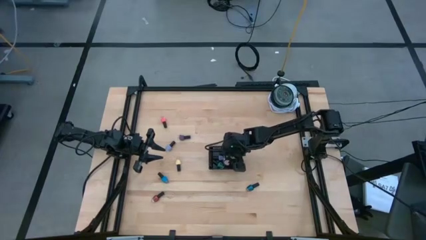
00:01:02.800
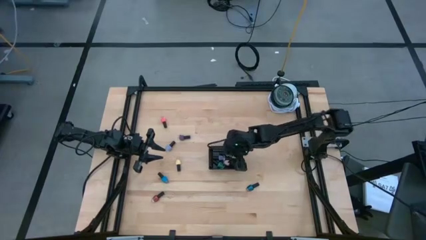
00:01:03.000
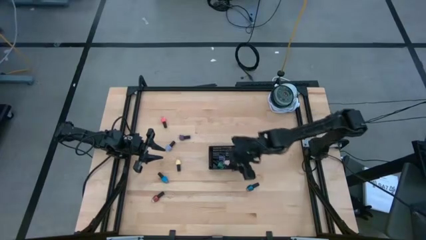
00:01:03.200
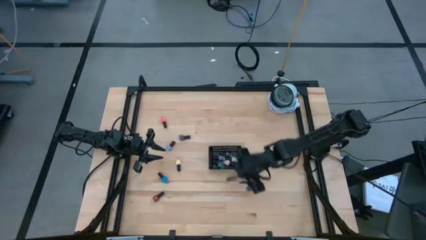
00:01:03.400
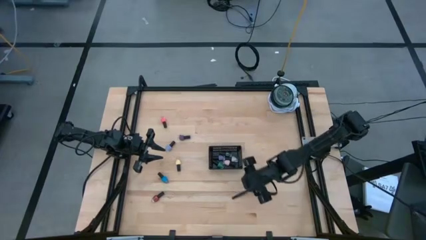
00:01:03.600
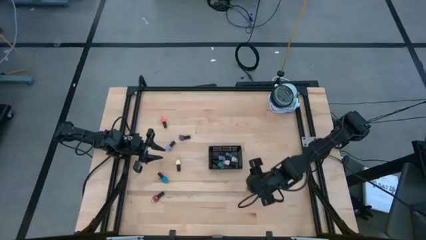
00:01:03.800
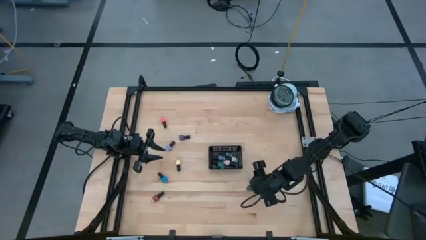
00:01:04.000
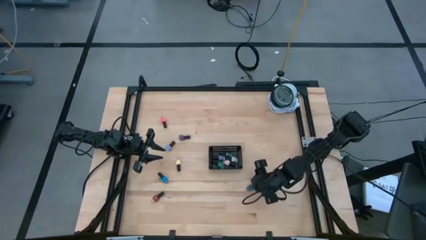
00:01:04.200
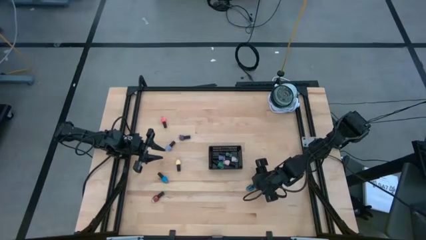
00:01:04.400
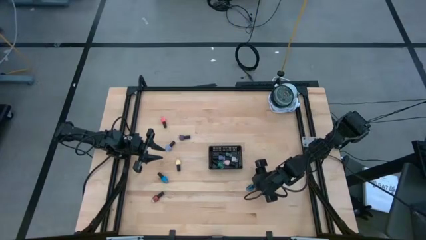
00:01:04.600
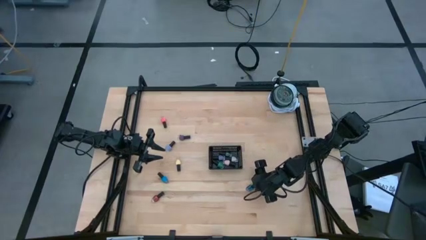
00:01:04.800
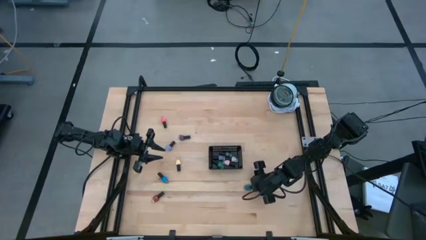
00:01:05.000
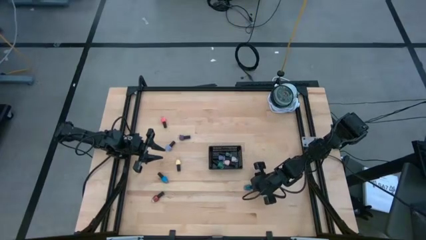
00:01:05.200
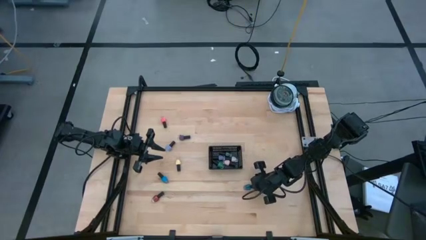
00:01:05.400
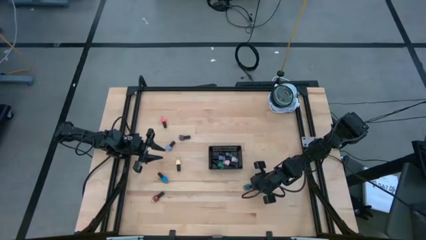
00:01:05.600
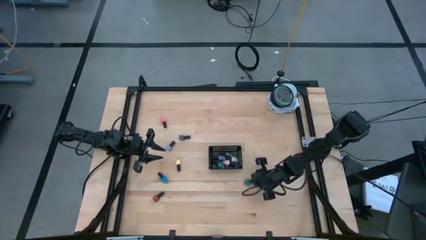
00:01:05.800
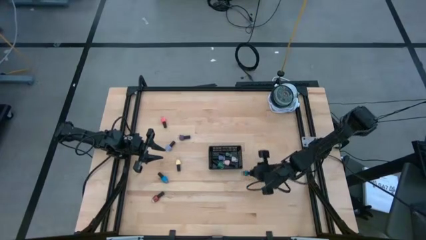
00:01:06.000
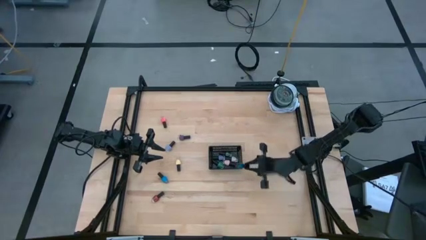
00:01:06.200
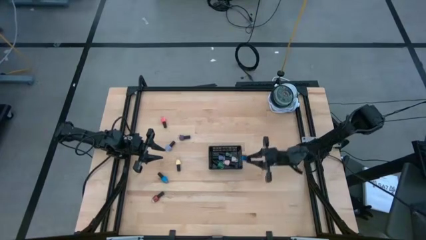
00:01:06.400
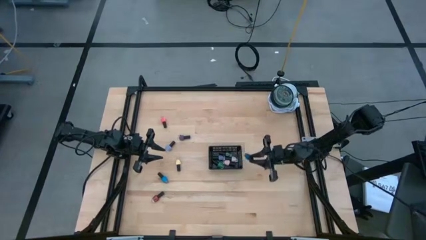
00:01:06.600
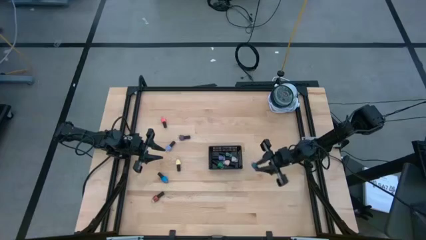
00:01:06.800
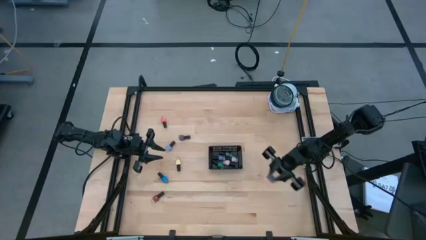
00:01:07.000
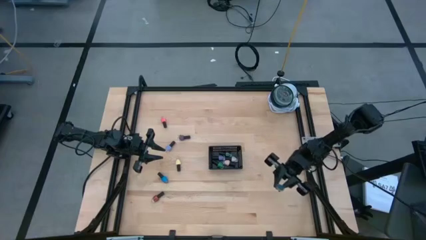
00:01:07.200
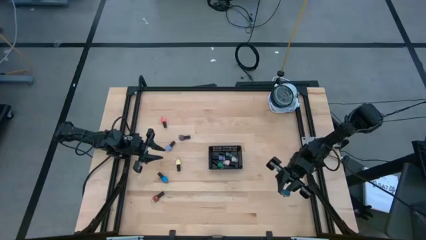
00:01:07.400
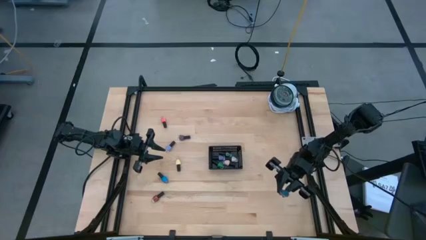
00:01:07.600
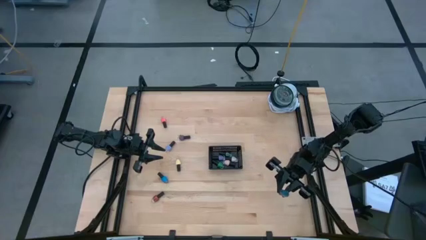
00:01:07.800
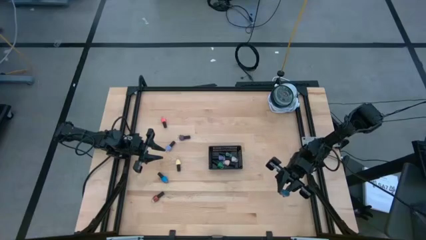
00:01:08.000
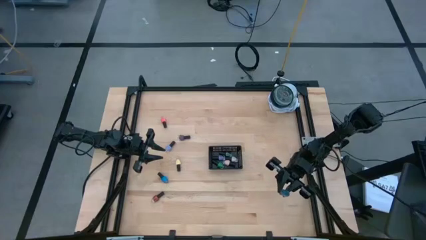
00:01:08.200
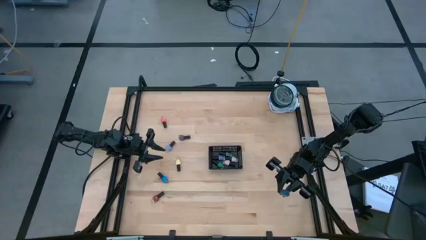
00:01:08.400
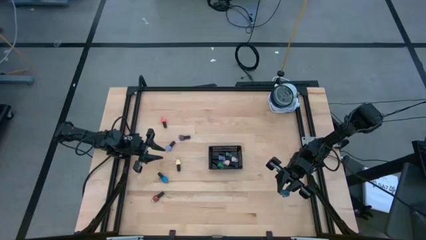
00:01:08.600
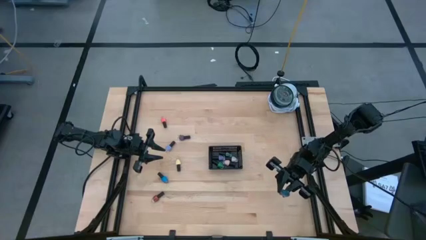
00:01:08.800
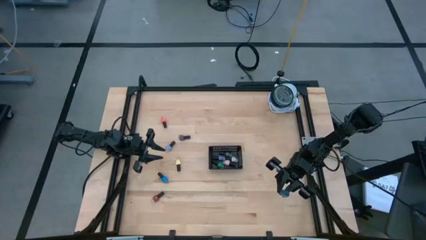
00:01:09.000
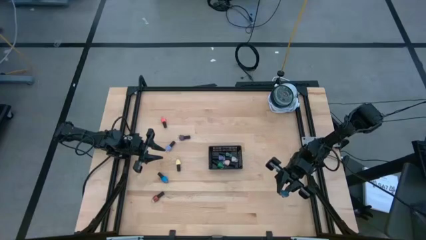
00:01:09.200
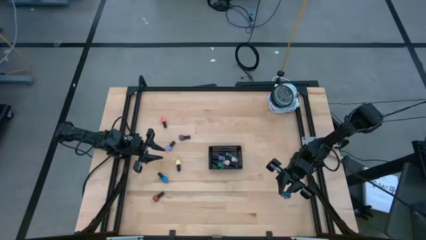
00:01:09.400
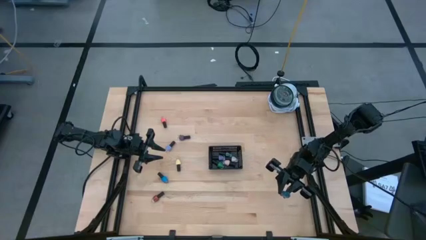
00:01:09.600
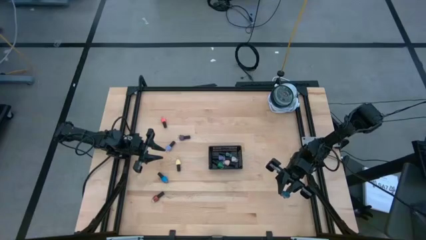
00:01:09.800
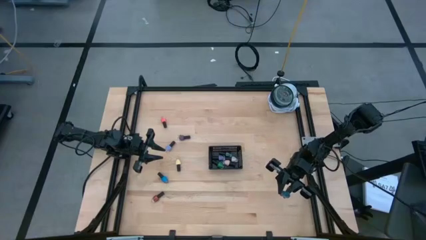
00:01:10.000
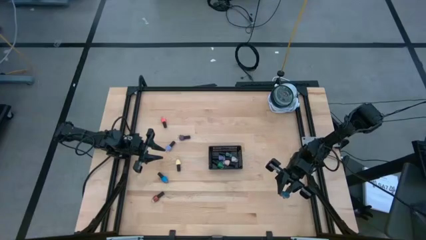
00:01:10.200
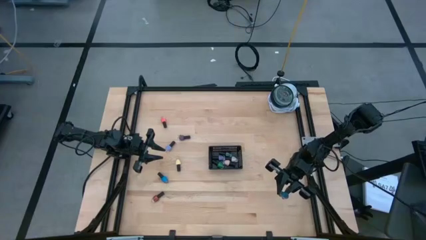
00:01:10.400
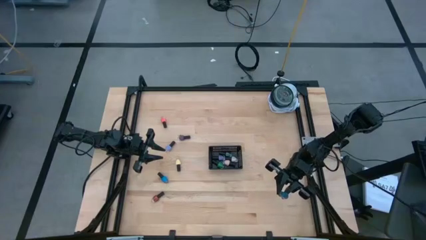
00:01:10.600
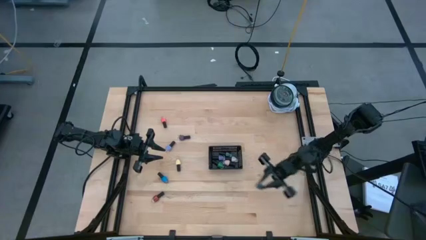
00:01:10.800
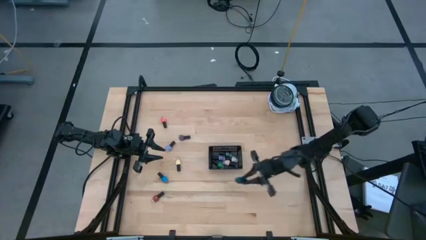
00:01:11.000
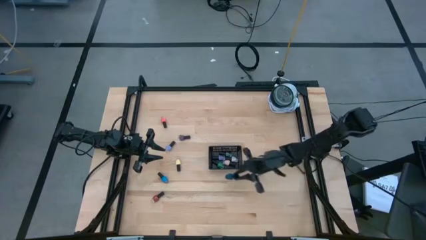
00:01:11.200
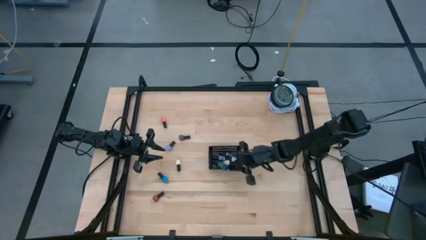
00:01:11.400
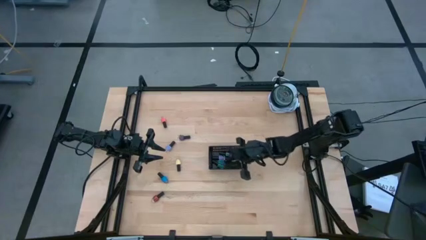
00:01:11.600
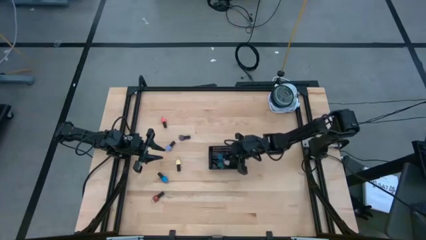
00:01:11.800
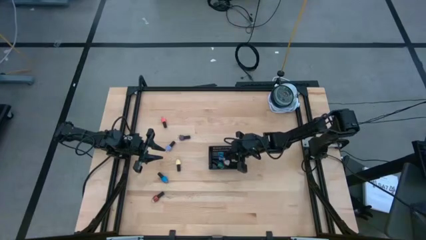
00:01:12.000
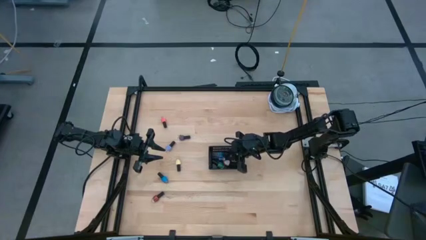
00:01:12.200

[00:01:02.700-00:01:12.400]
Task: Pick & Place Nail Polish
Put the right blue nail polish into the black bin

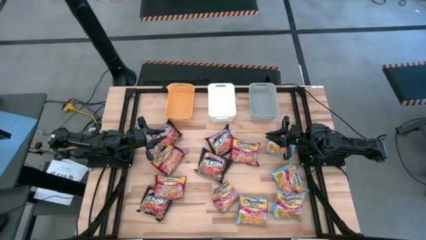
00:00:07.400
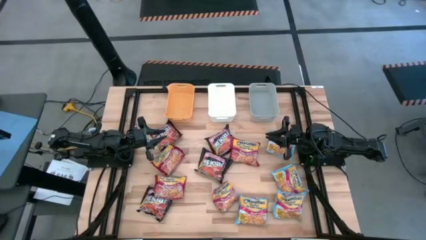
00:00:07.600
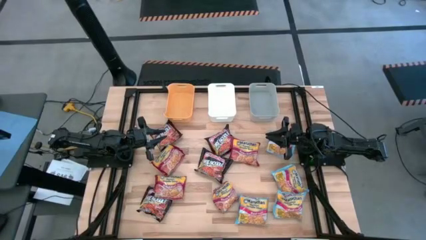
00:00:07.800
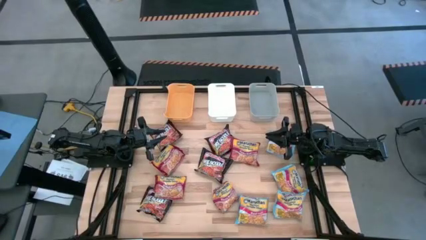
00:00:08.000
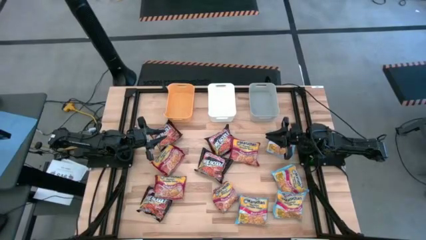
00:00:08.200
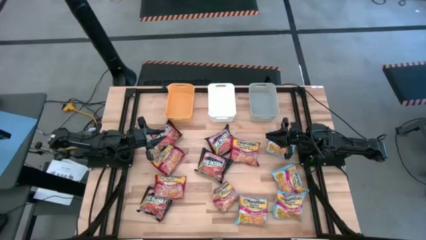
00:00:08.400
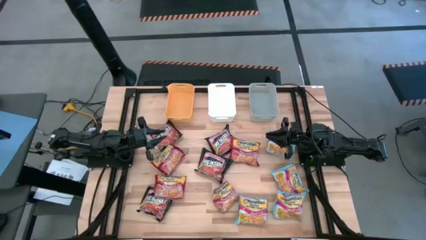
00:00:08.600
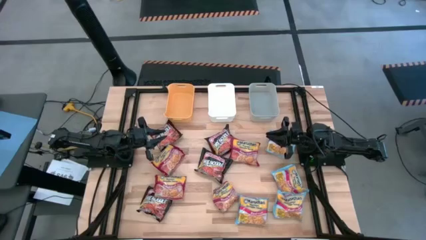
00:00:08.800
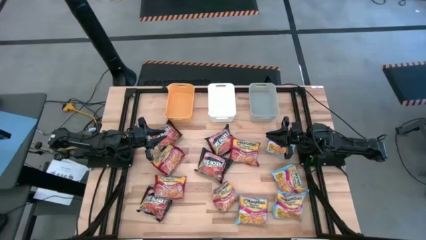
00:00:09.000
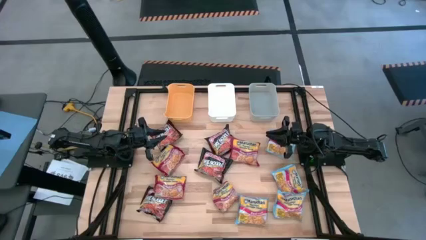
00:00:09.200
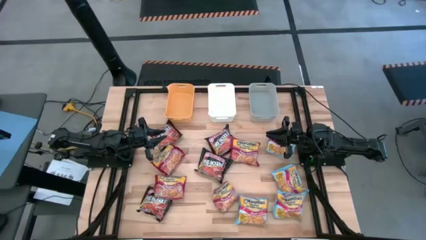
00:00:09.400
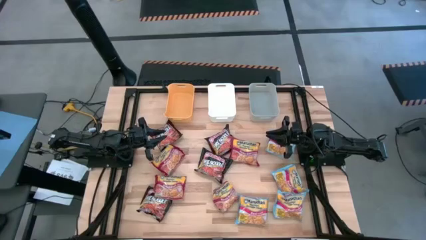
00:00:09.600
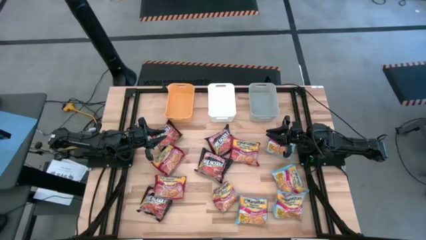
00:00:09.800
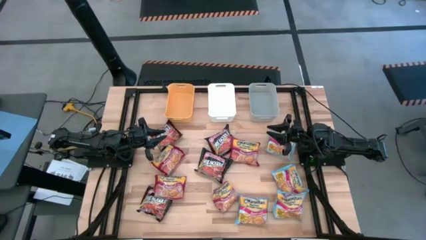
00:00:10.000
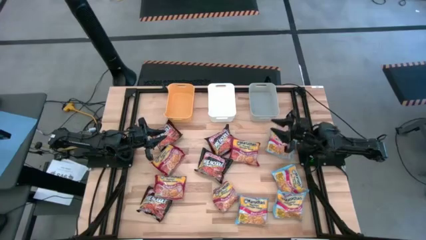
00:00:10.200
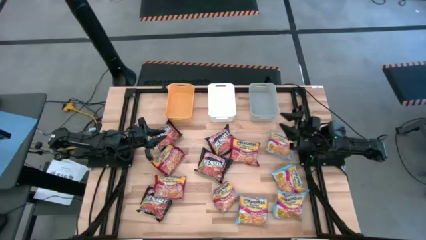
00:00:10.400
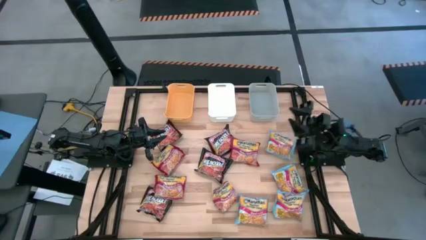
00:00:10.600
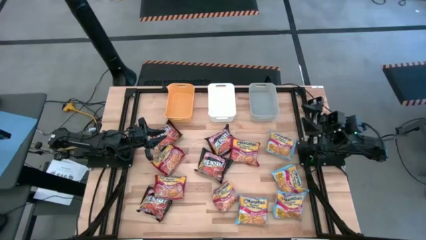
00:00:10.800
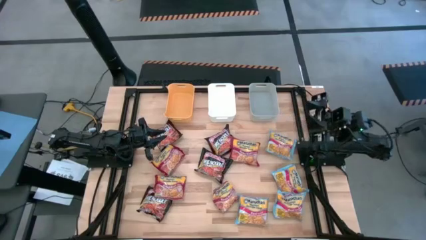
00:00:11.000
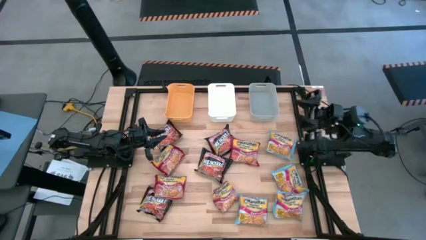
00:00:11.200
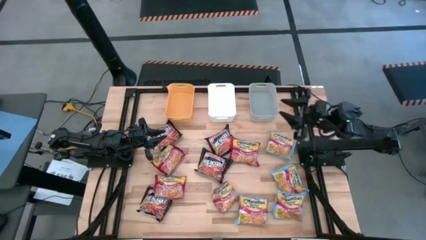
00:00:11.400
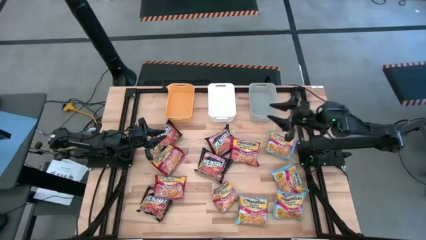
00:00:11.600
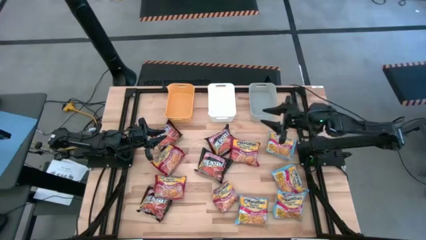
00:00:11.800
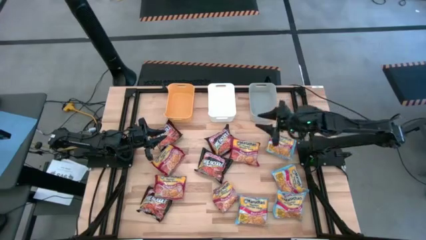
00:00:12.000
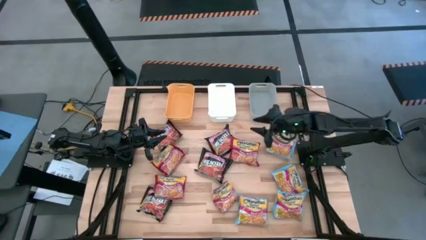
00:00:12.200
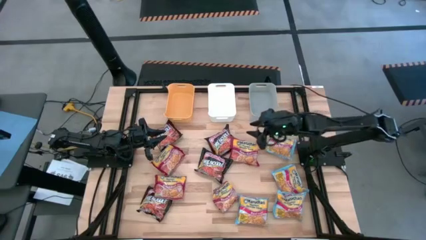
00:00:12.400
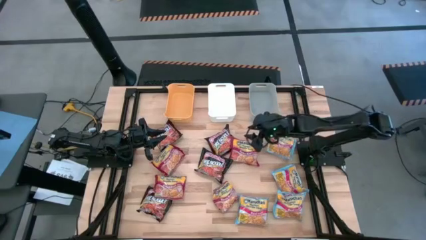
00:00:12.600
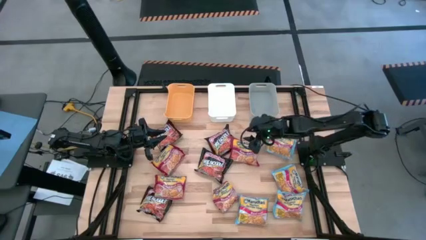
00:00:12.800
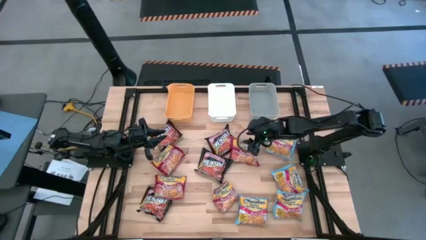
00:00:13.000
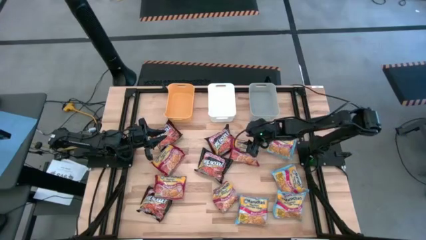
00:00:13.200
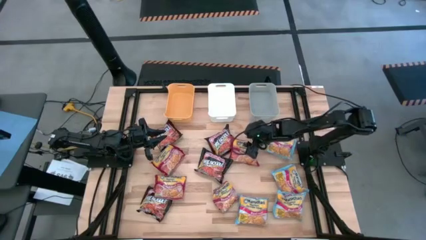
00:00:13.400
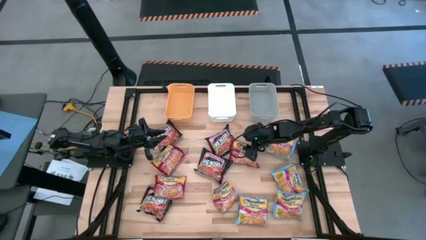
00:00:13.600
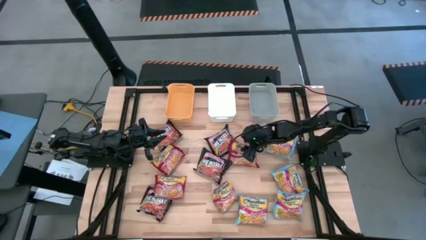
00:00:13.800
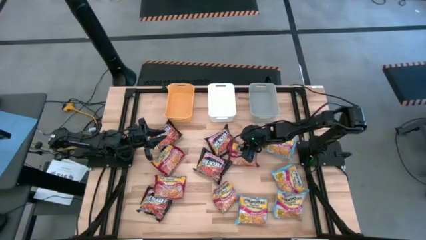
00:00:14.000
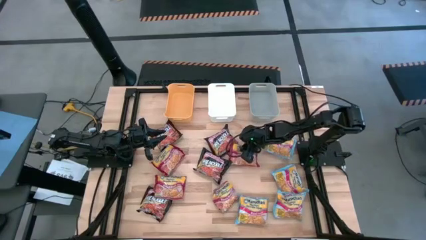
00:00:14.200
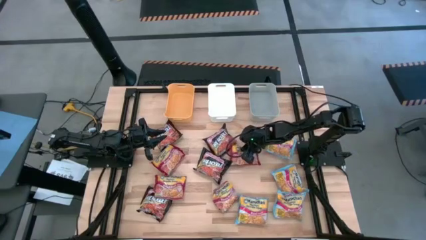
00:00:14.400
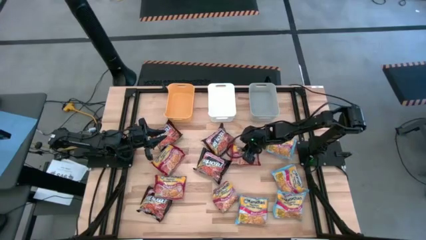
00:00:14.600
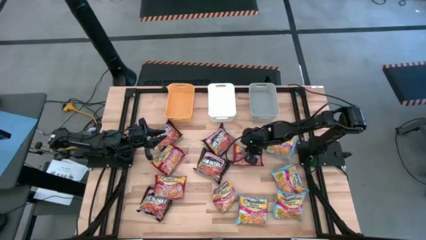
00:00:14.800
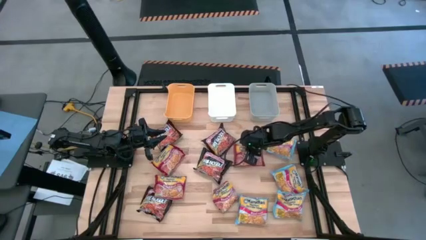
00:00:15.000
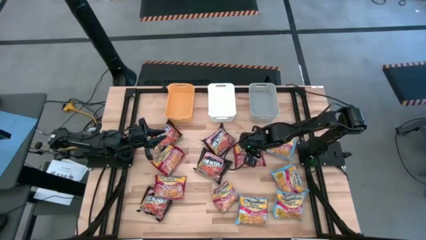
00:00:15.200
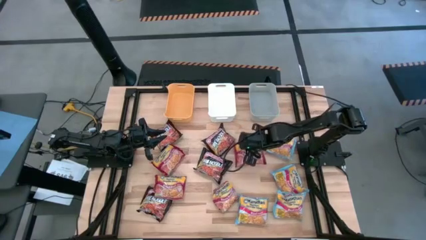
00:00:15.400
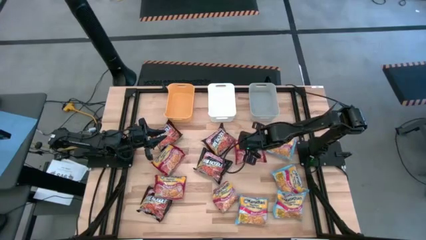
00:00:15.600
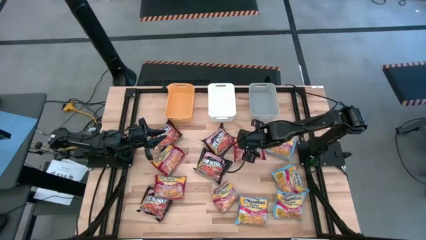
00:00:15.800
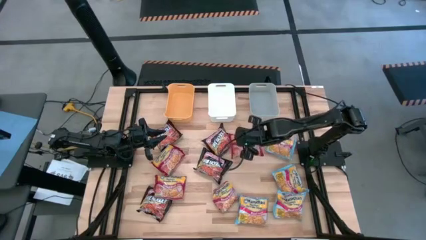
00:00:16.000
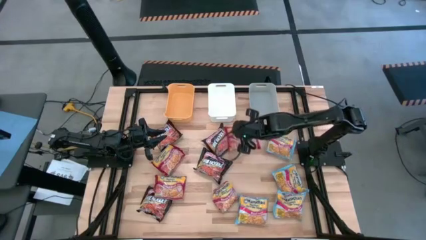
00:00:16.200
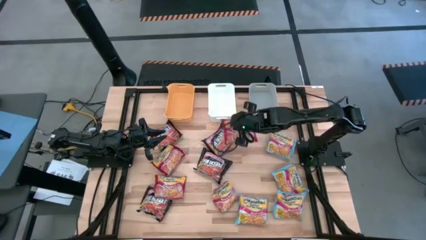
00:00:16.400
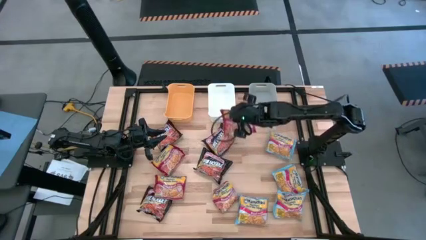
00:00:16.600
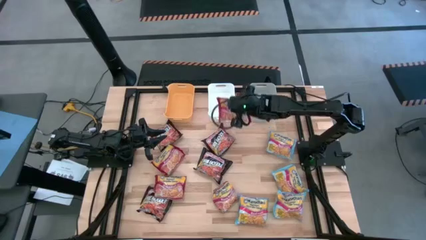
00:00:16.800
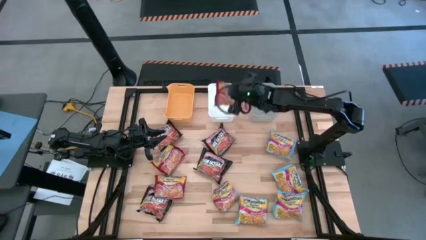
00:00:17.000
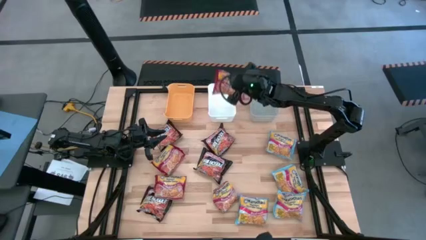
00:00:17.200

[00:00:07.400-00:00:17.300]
Task: Sort Maruchan noodles
Put the red noodle pack into the white bin
